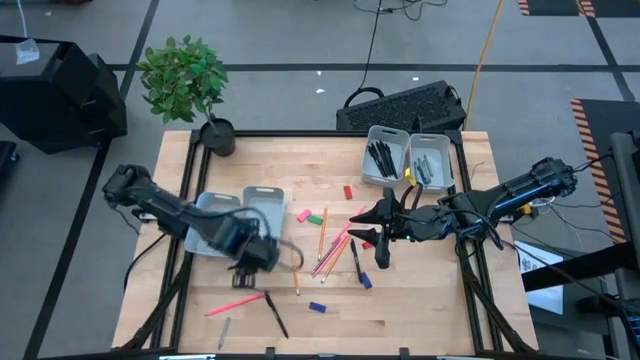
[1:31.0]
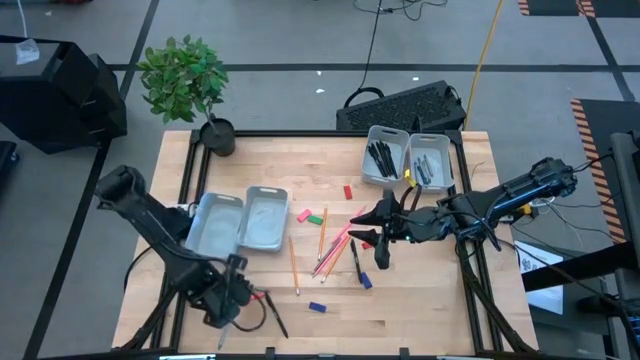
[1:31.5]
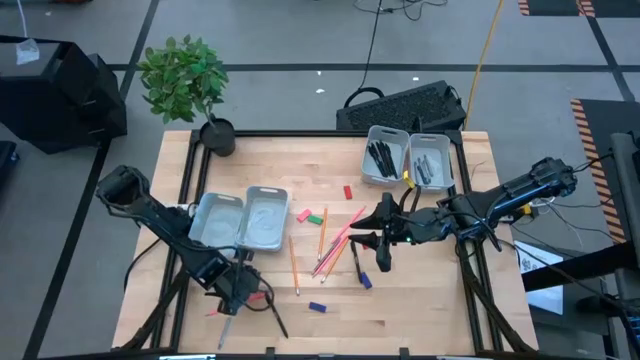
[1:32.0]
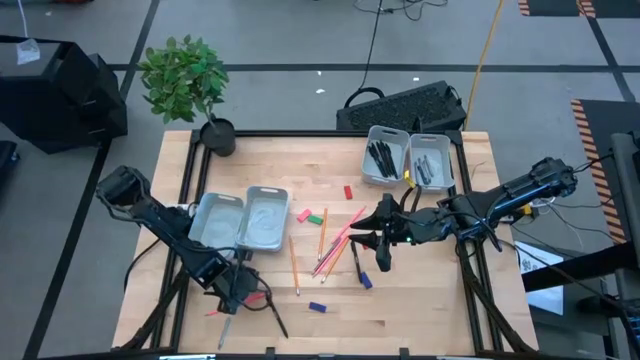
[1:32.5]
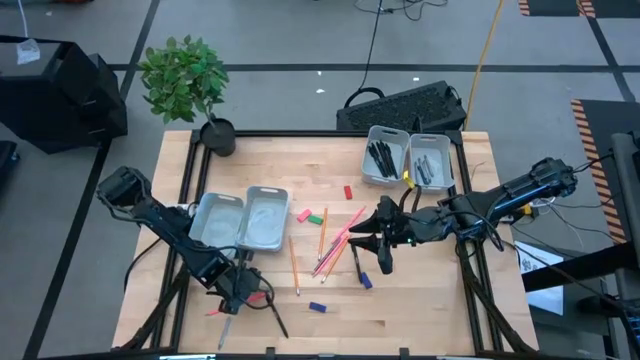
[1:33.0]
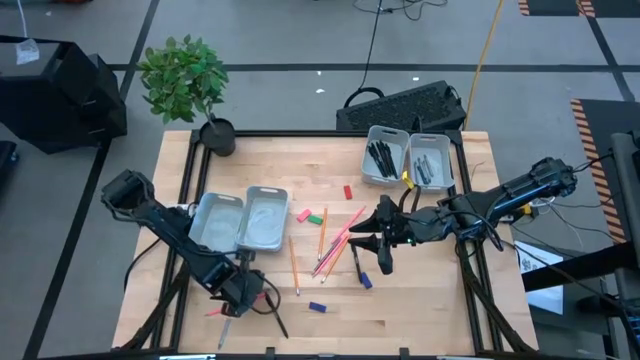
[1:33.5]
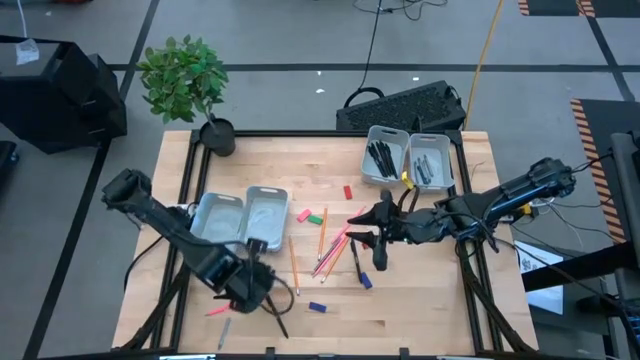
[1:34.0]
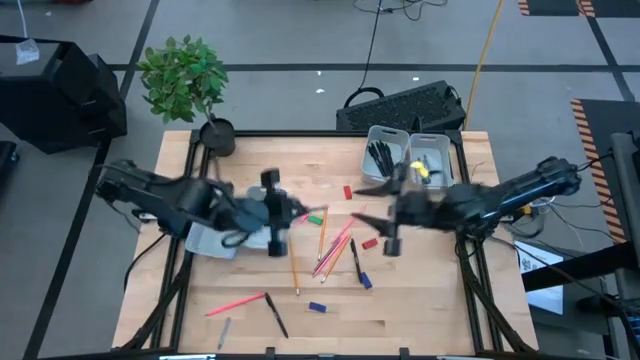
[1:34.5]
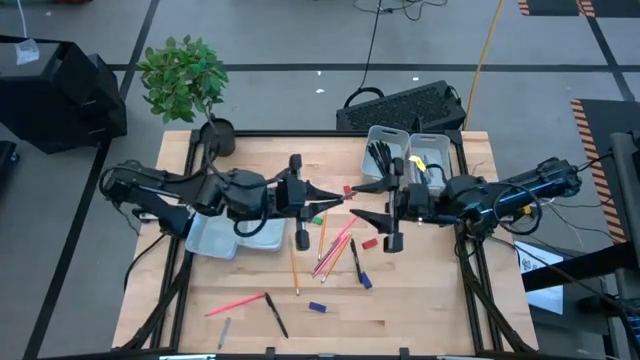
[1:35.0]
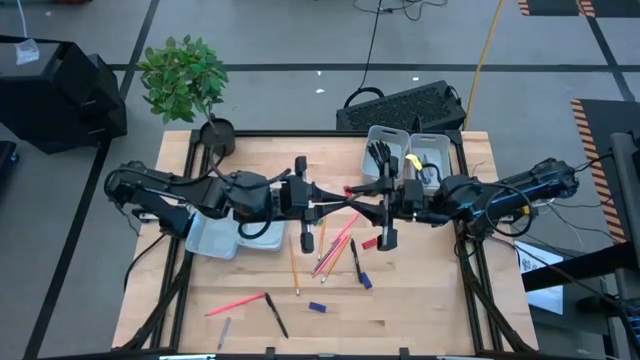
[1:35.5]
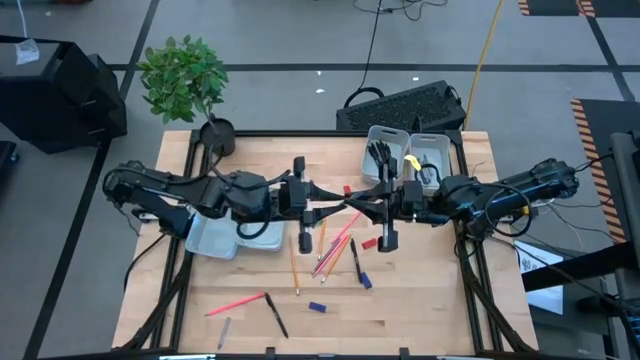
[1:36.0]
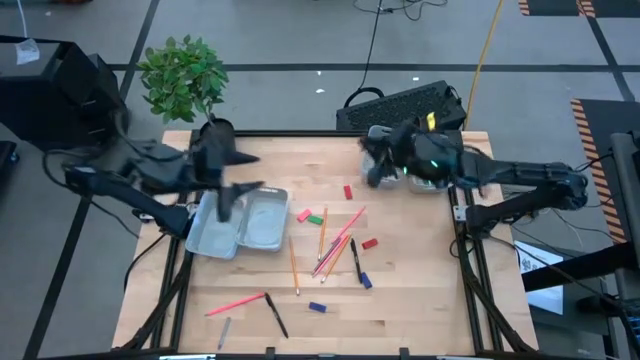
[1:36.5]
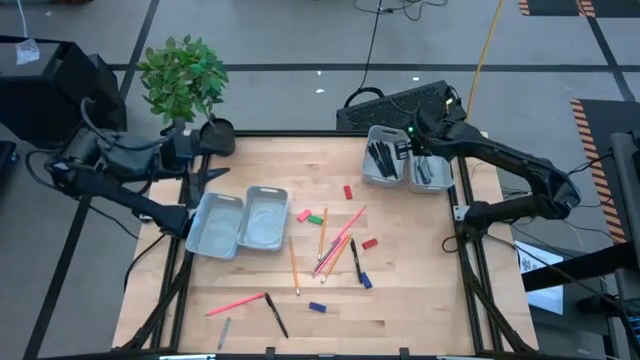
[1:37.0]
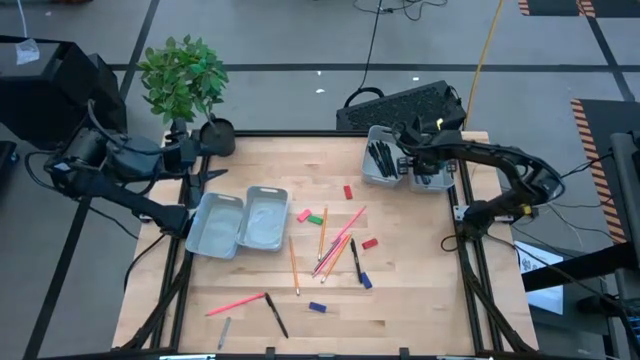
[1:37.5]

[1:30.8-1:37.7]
Task: Sort crayons/erasers/pens/pencils in bins
Put the gray crayon into the top right gray bin

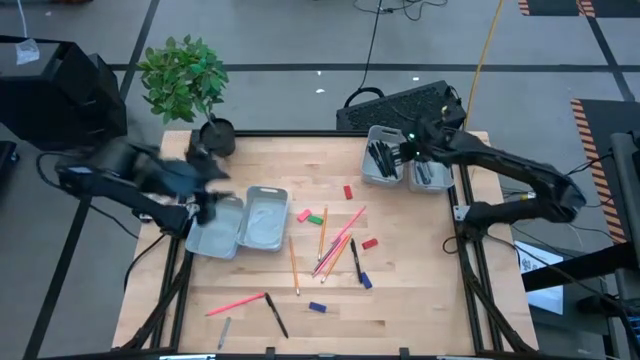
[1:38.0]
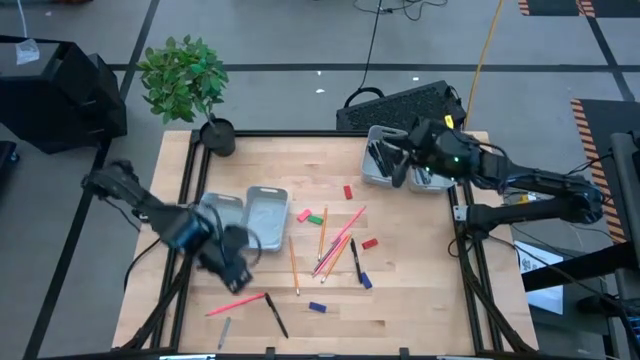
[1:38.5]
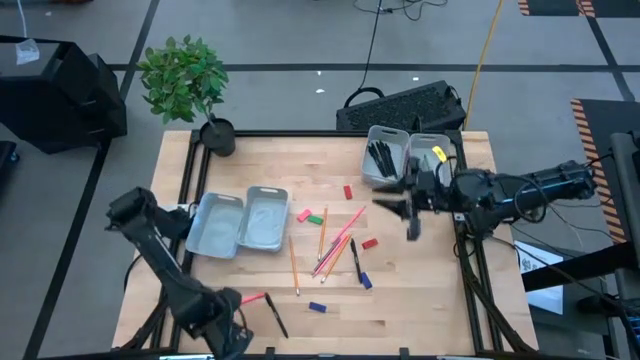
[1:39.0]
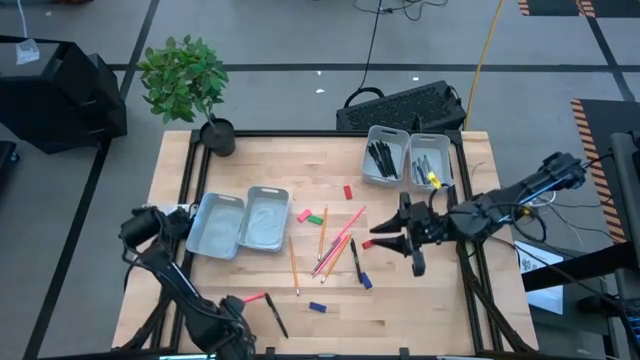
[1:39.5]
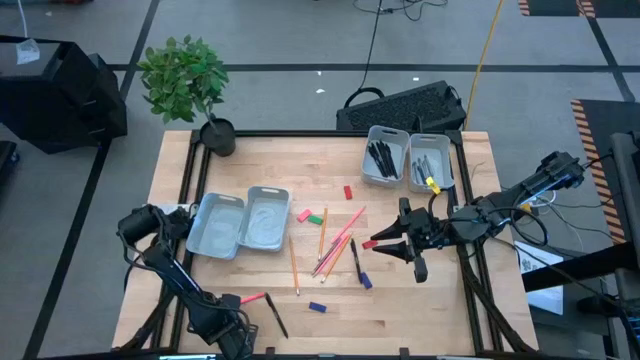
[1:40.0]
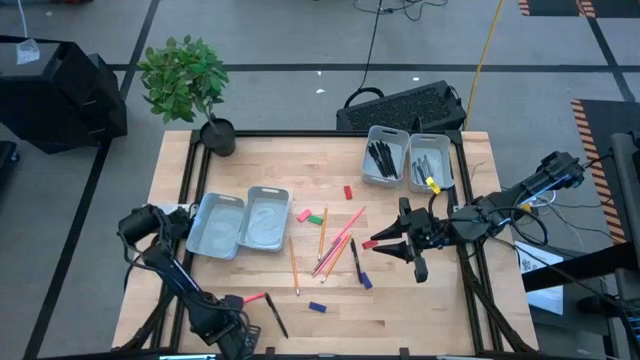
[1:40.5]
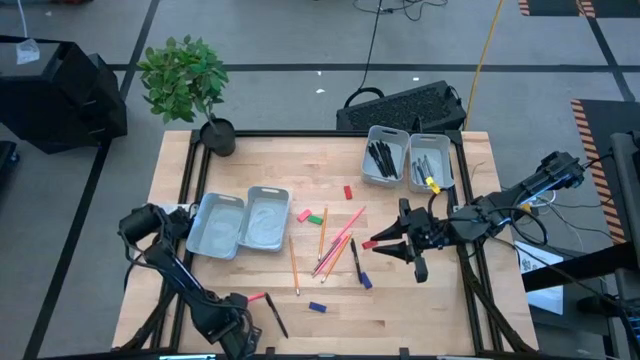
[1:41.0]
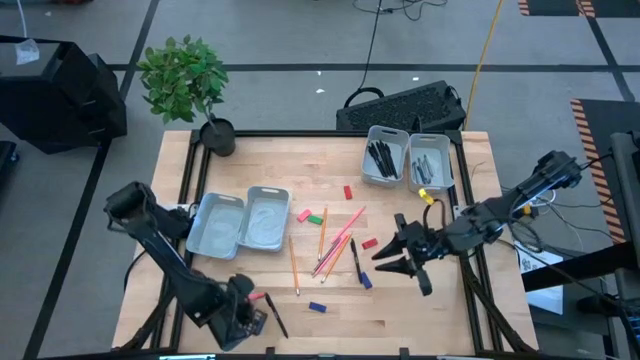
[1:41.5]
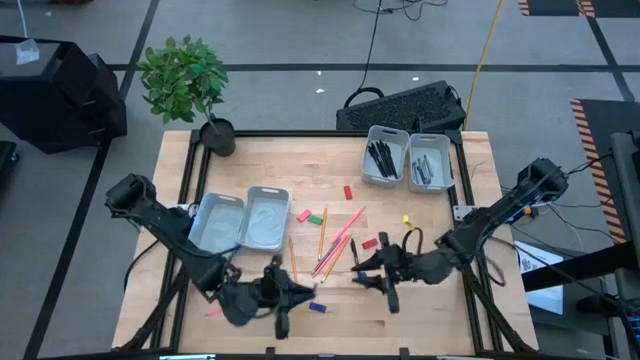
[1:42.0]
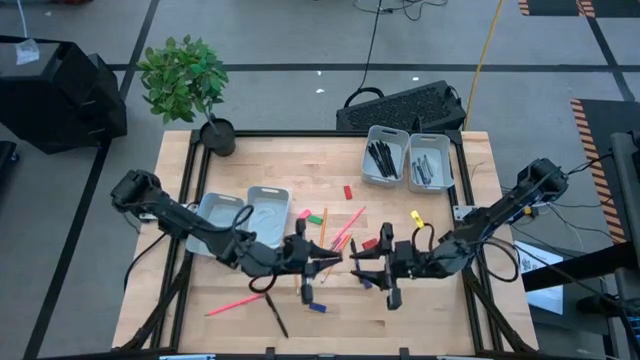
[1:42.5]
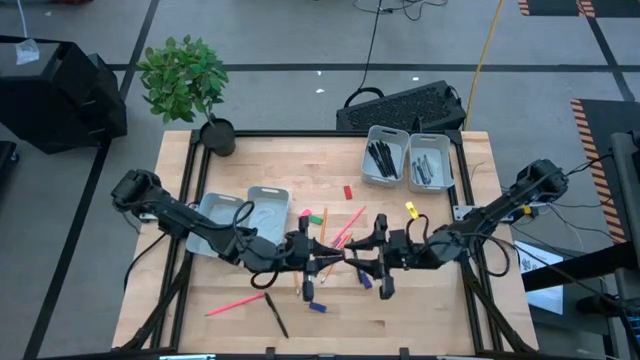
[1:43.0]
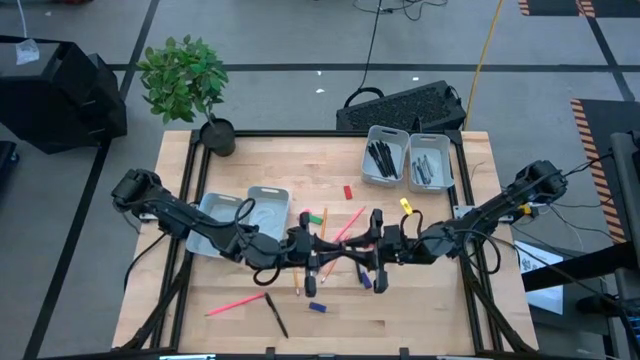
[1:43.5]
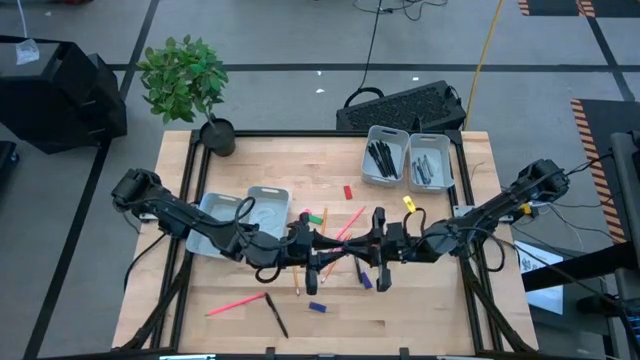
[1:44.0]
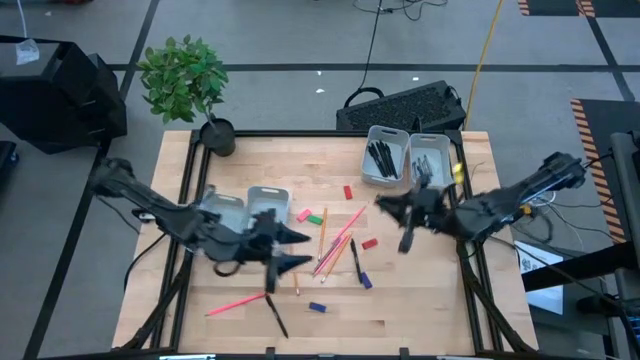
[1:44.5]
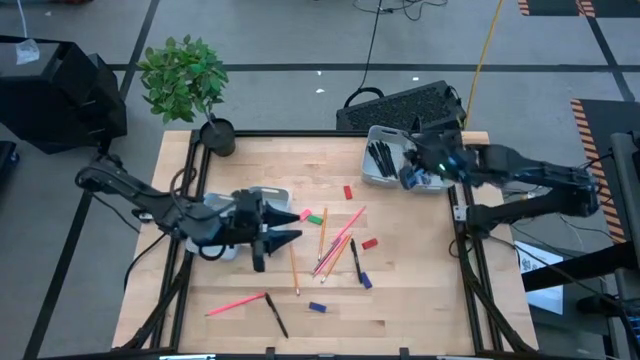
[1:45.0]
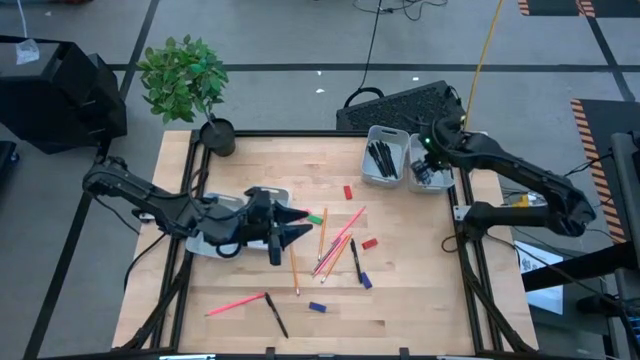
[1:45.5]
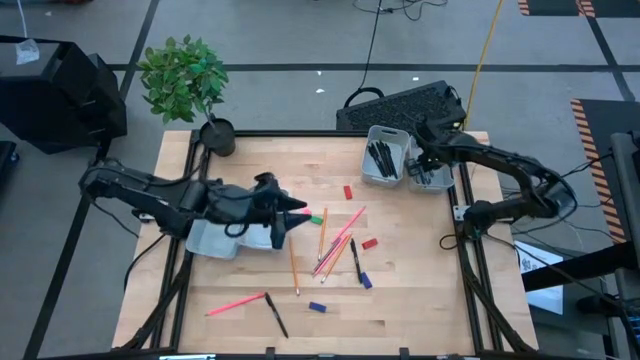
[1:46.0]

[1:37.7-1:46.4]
Put the gray crayon into the top right gray bin

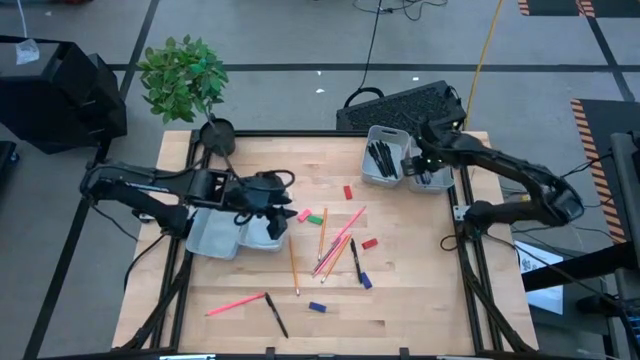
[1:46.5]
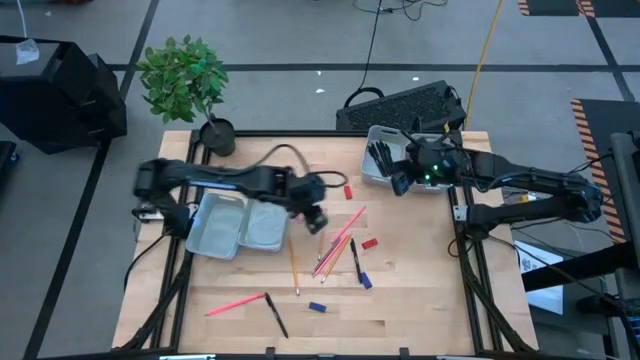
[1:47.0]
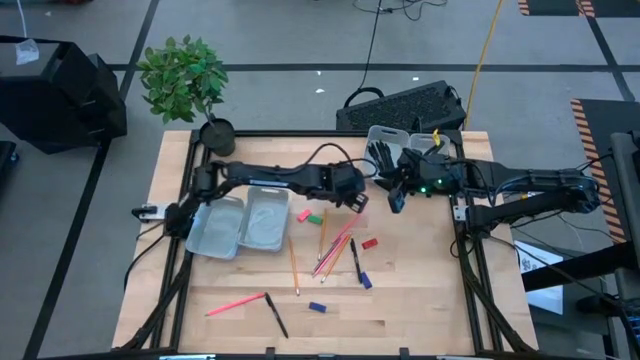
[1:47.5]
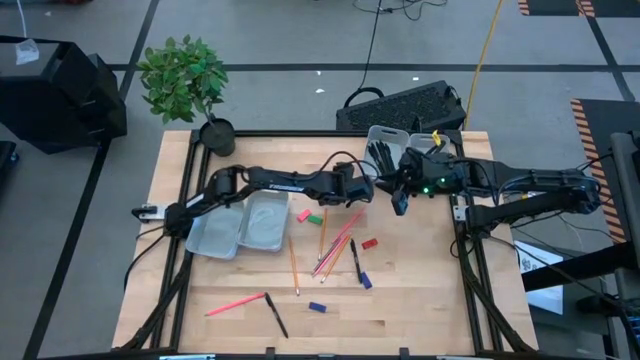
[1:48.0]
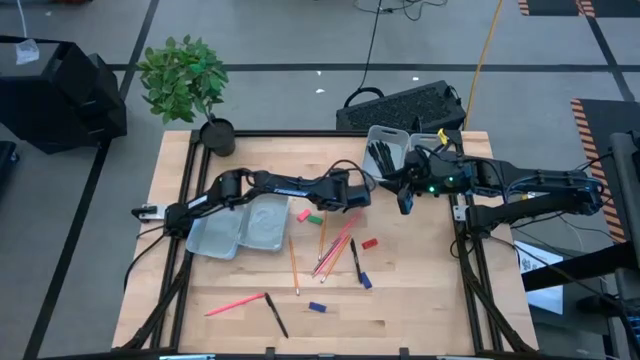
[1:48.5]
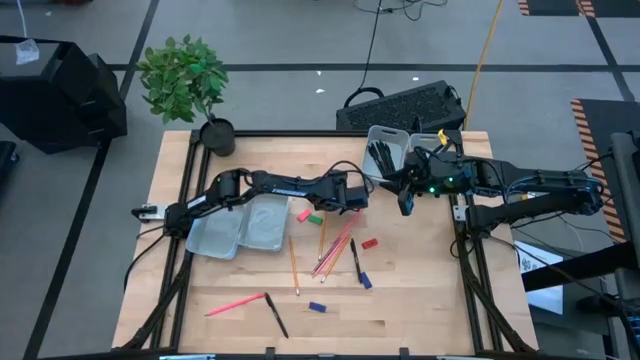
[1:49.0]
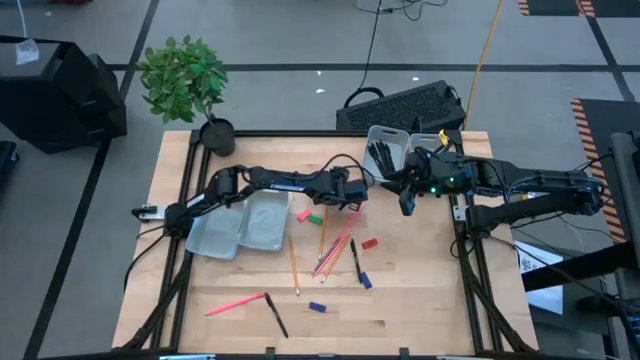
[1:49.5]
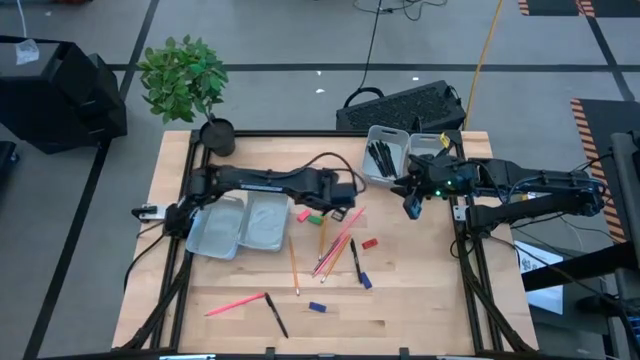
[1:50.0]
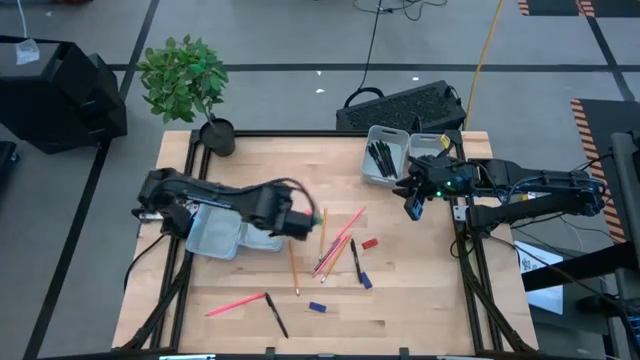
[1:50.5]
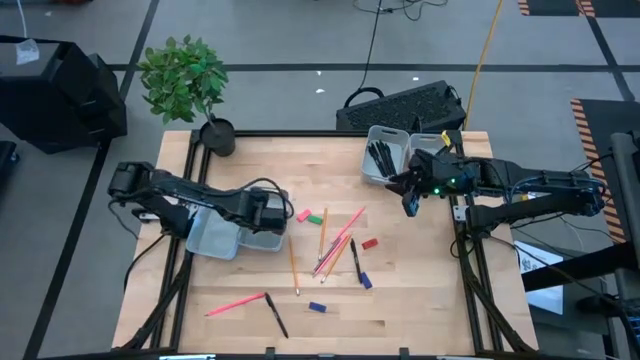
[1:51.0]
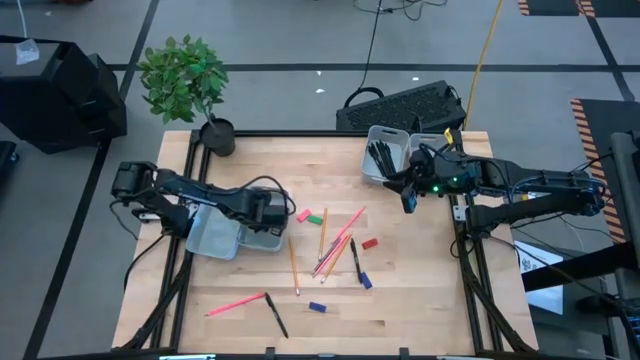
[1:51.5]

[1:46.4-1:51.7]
Put the red eraser into the bottom right gray bin

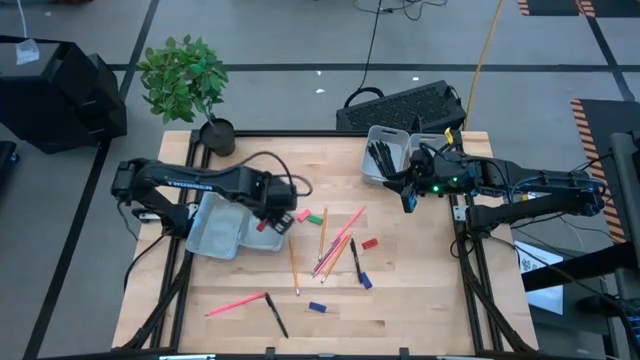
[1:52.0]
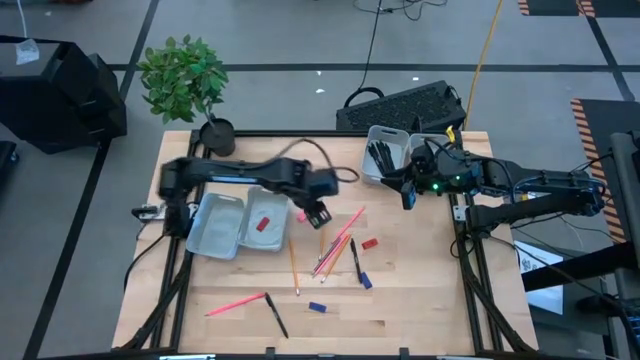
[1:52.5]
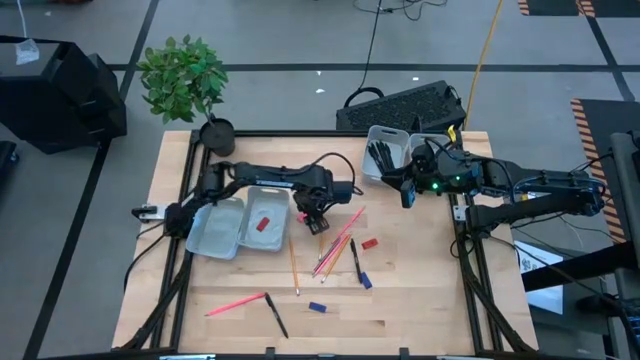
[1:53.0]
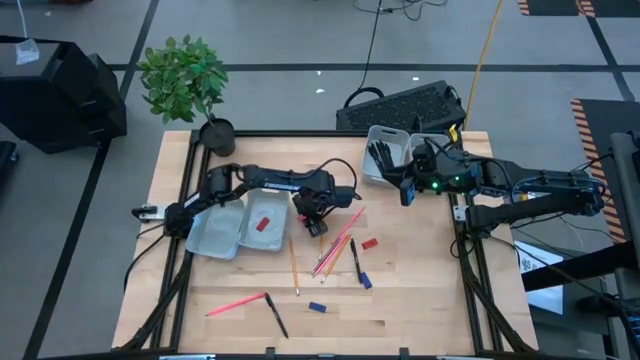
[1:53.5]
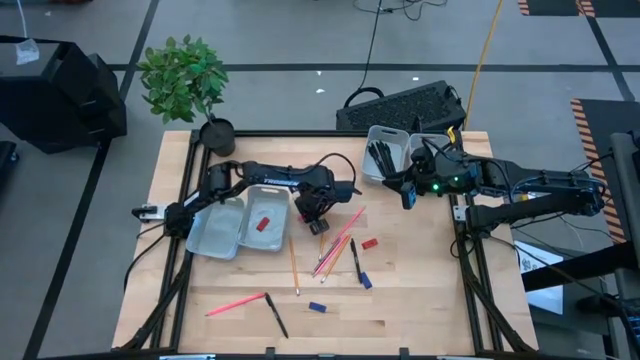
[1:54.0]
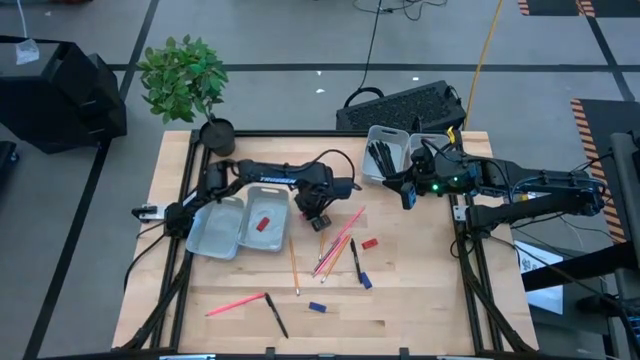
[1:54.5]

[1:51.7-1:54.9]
Put the pink eraser into the bottom right gray bin
